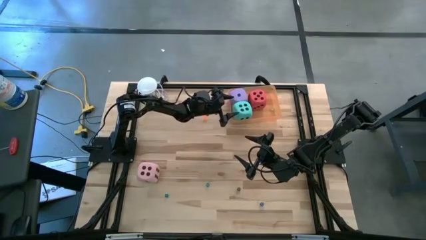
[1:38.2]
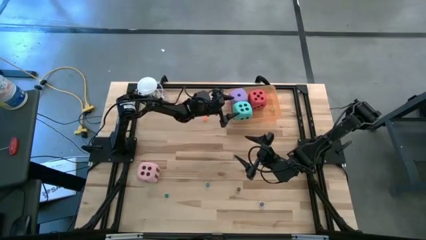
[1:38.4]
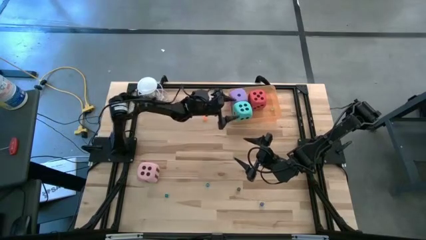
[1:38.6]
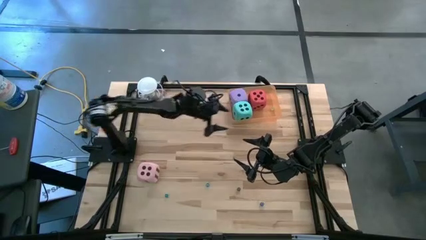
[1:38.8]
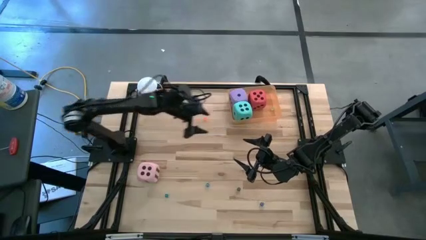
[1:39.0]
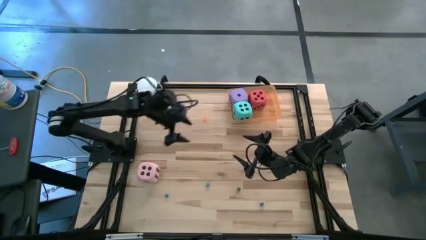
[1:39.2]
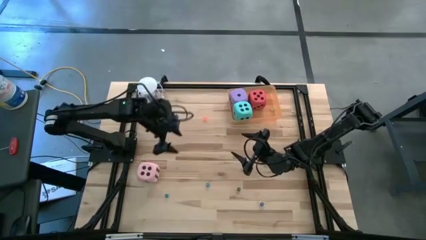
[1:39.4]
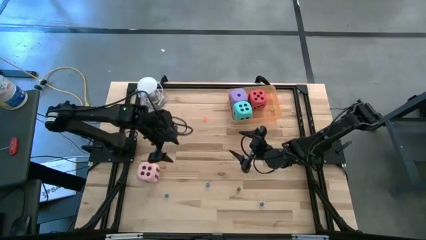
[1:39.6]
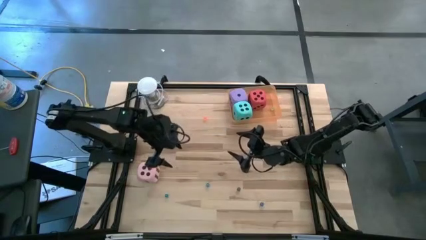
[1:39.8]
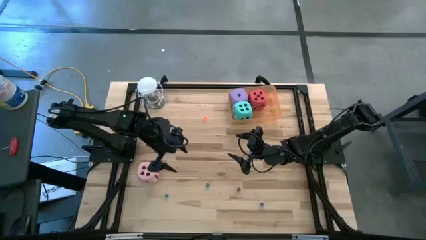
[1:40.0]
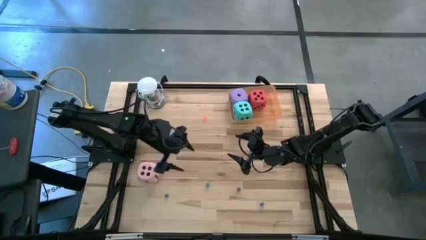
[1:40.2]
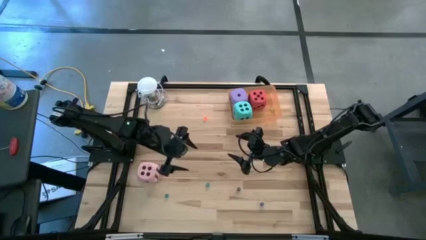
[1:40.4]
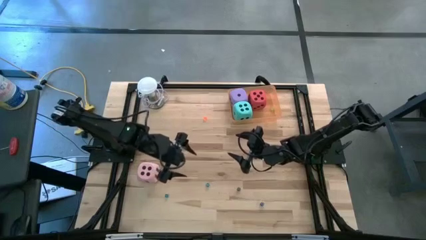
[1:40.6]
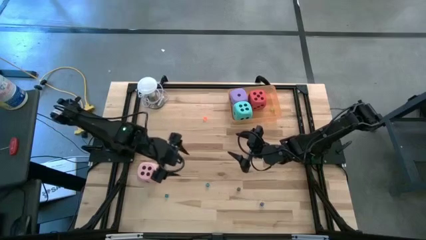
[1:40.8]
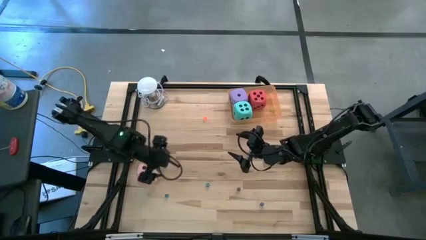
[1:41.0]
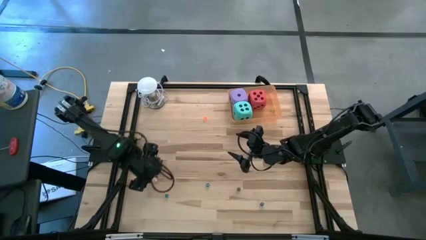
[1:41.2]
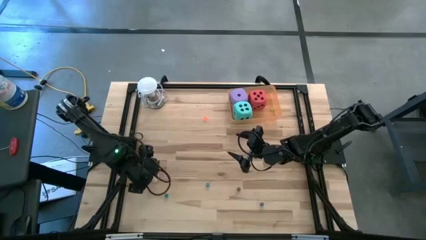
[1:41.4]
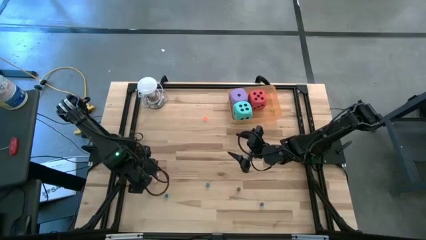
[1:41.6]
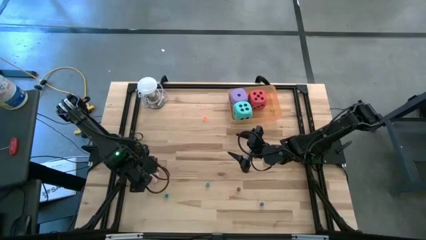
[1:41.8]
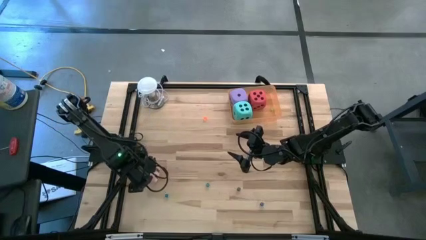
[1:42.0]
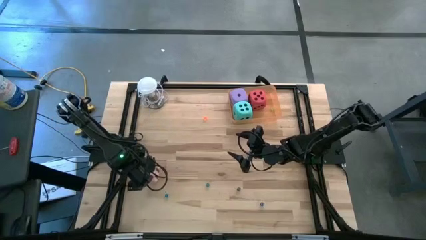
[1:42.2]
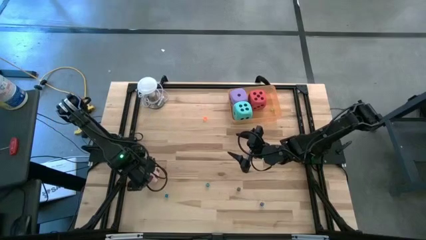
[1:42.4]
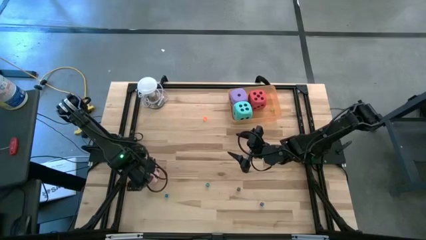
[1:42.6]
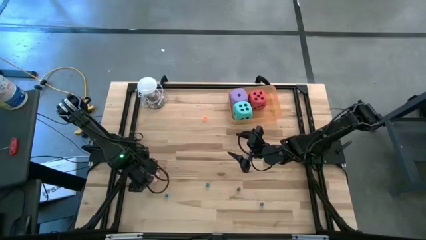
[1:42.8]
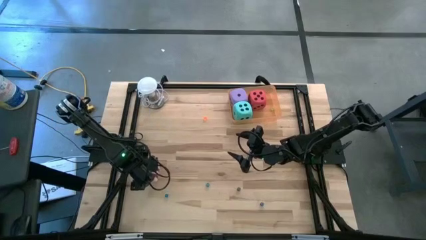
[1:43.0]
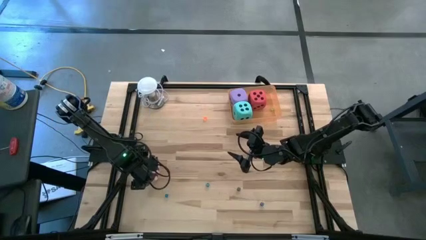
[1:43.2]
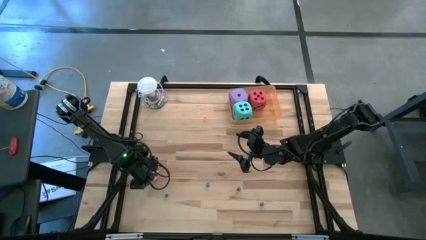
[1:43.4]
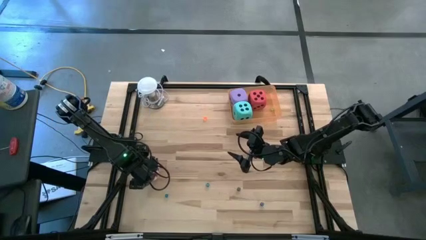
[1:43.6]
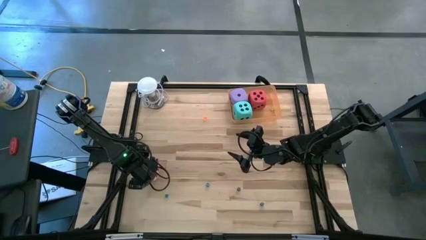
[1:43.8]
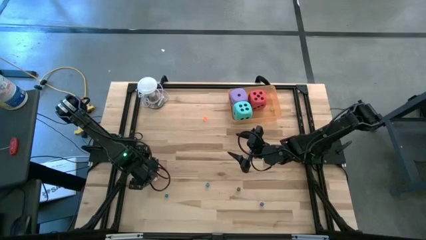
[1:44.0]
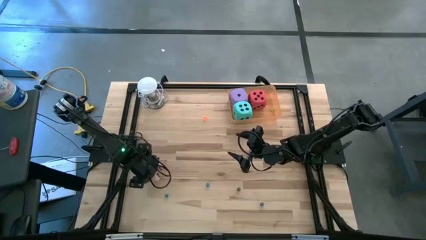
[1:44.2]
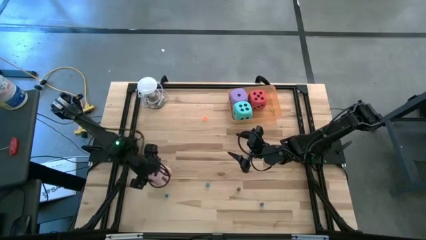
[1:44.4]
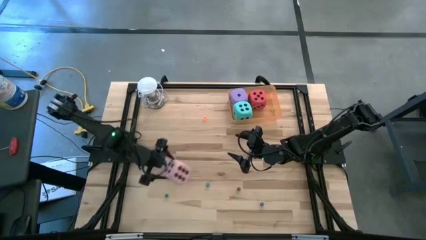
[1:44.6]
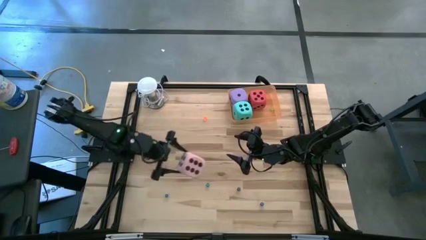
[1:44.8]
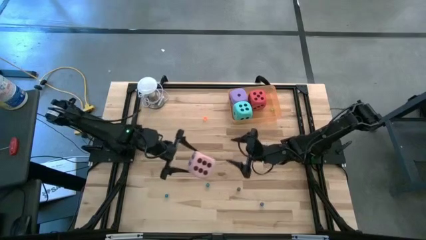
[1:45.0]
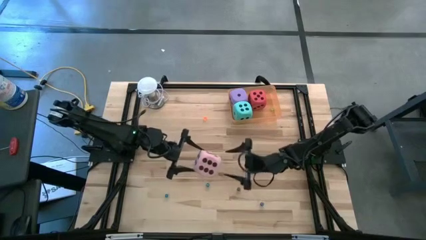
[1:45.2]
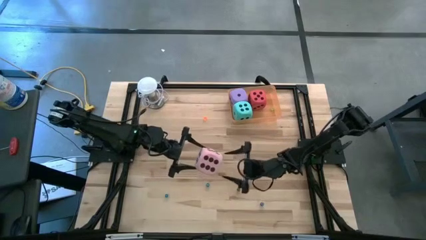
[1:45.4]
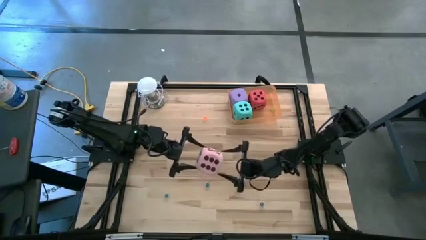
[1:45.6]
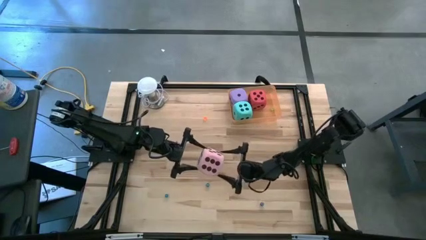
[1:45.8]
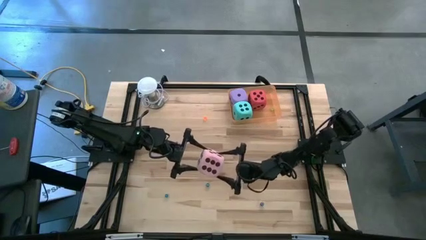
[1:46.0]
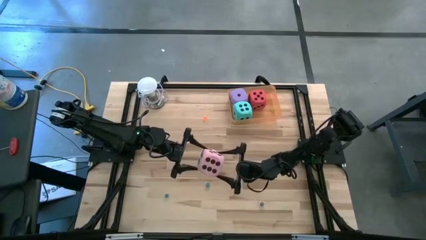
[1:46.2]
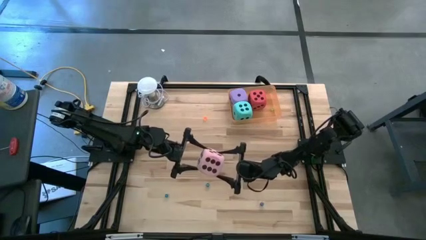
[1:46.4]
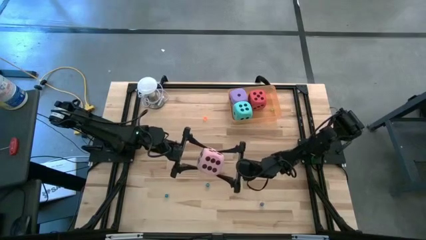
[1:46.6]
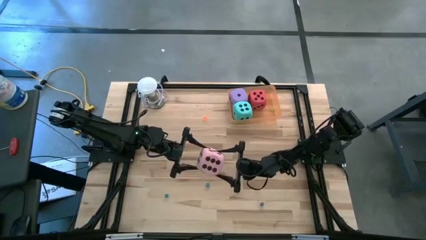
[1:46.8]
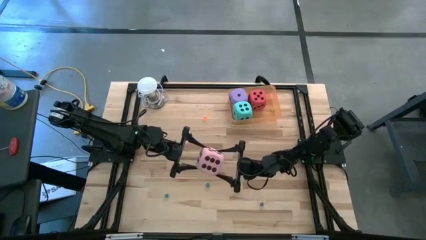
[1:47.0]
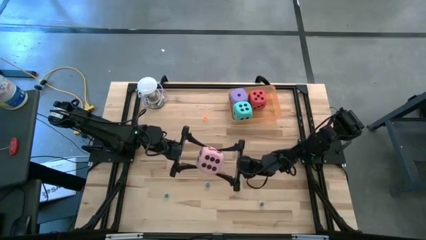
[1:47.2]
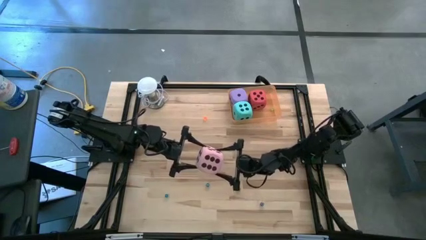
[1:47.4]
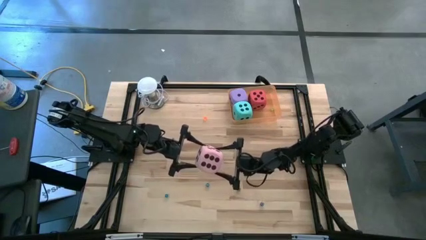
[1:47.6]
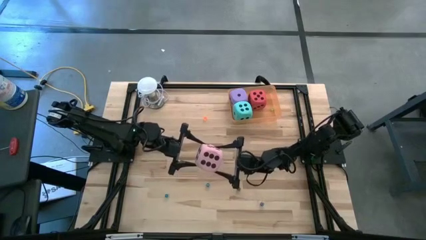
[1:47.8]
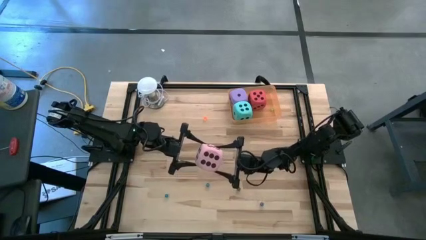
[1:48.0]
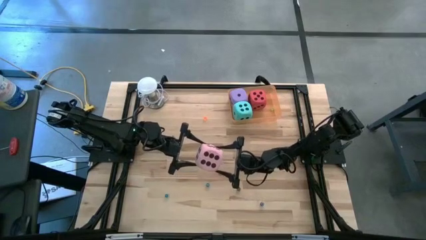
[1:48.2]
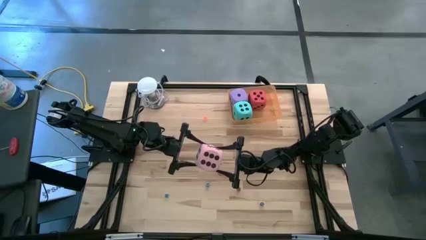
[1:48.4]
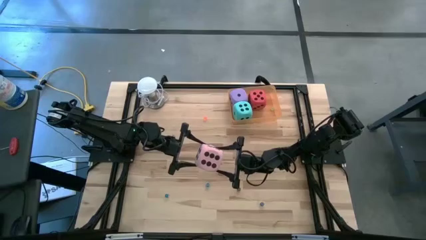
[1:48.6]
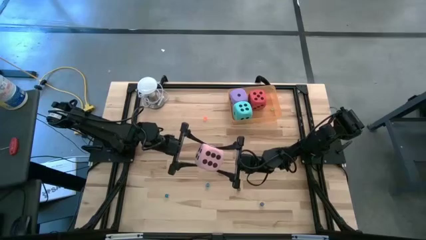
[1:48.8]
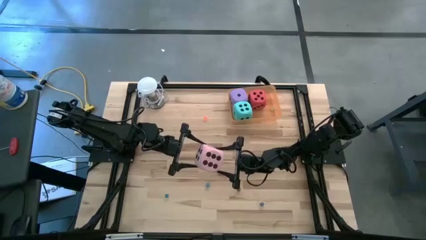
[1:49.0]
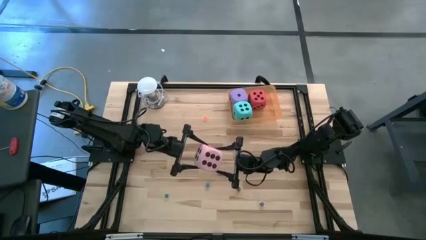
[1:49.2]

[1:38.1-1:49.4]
Task: Pick & Place Dice
Put the large pink die into the orange bin

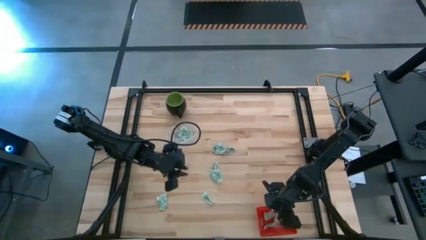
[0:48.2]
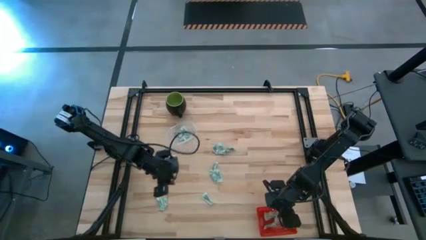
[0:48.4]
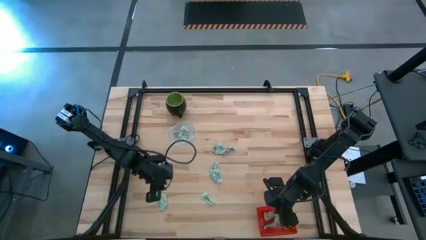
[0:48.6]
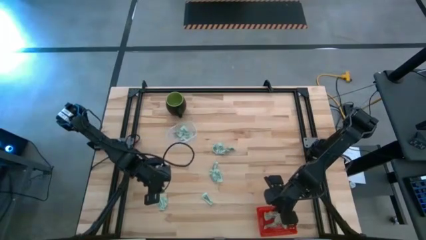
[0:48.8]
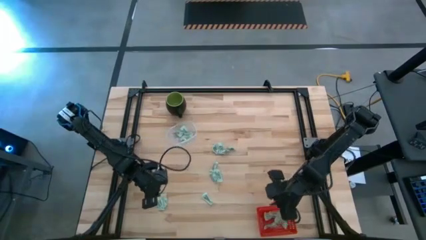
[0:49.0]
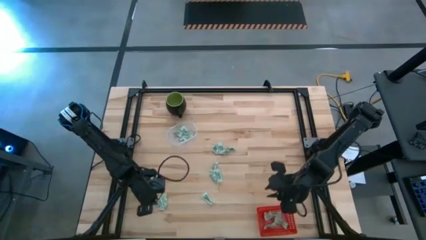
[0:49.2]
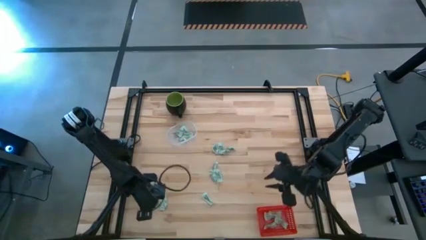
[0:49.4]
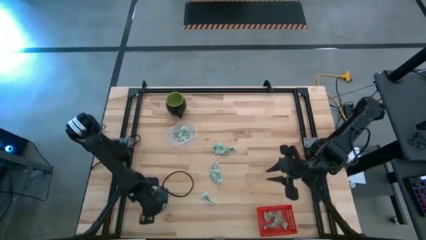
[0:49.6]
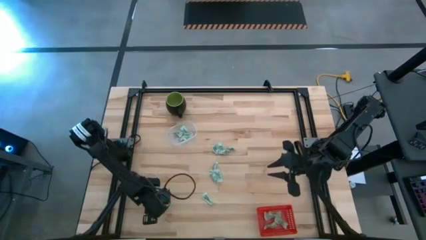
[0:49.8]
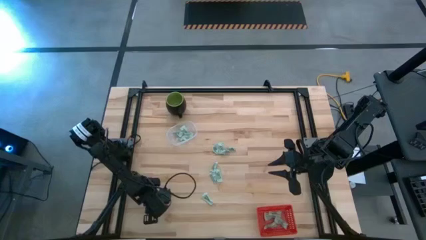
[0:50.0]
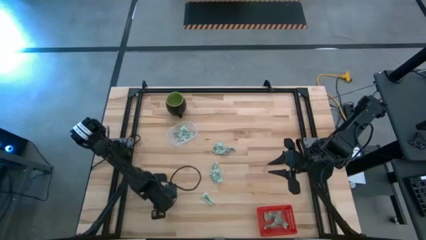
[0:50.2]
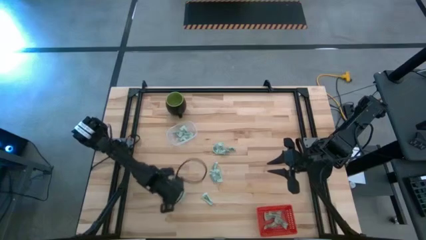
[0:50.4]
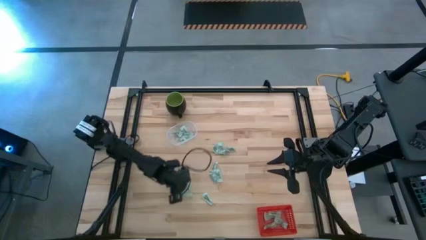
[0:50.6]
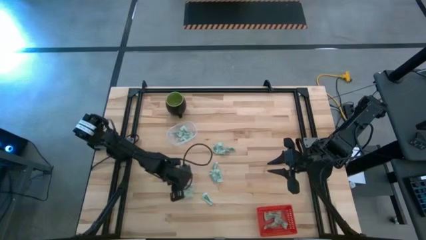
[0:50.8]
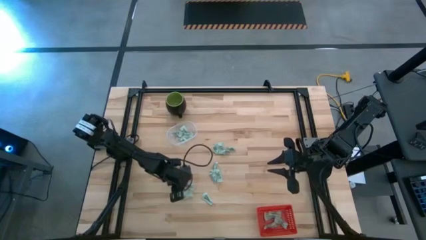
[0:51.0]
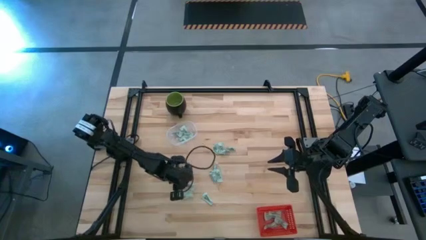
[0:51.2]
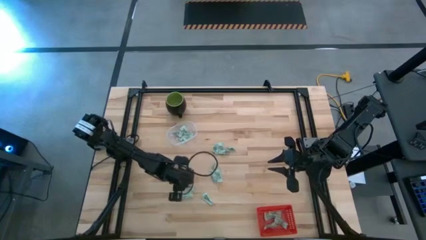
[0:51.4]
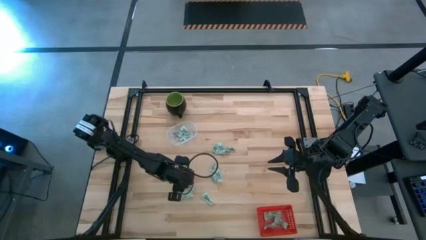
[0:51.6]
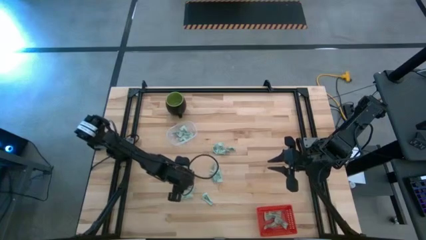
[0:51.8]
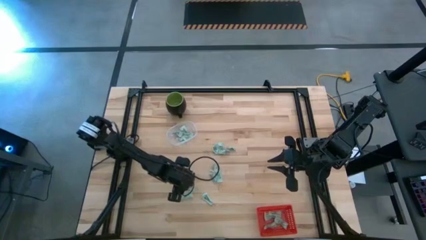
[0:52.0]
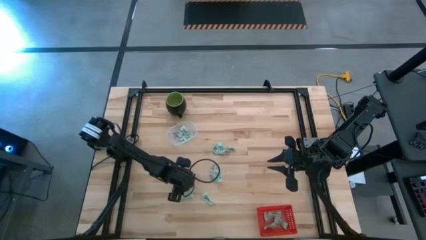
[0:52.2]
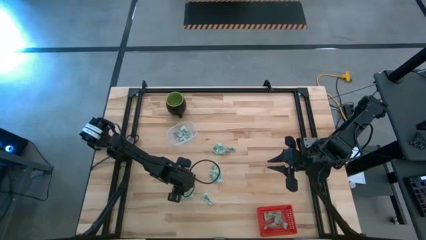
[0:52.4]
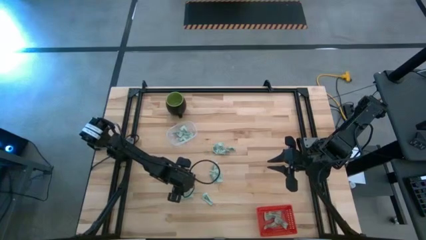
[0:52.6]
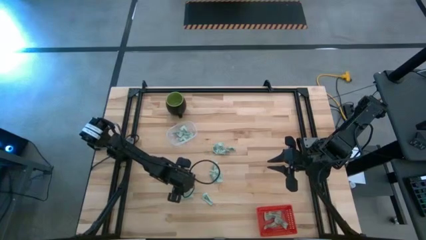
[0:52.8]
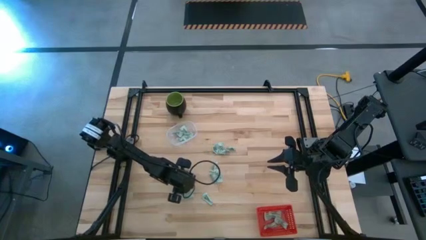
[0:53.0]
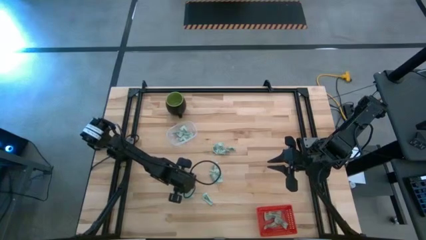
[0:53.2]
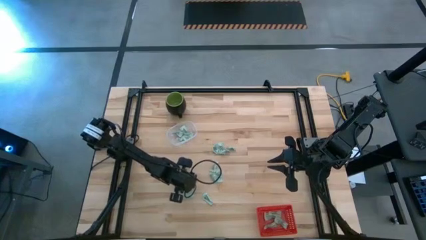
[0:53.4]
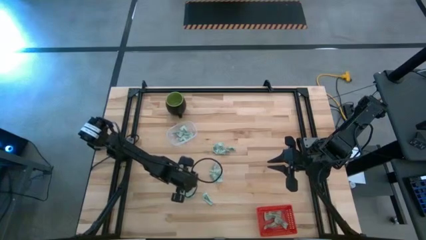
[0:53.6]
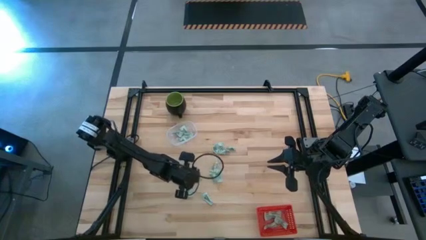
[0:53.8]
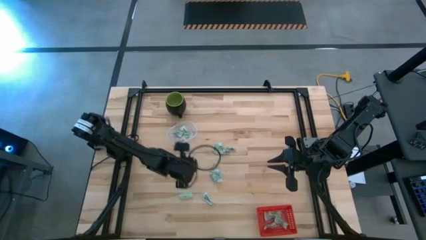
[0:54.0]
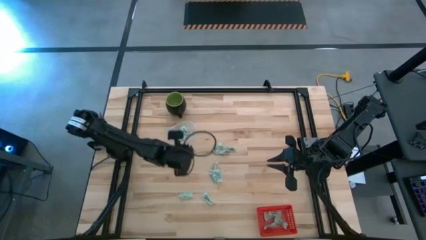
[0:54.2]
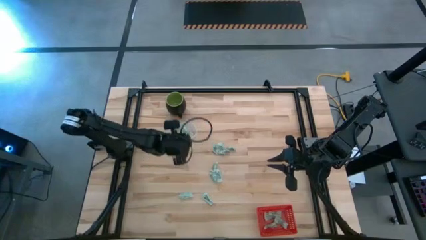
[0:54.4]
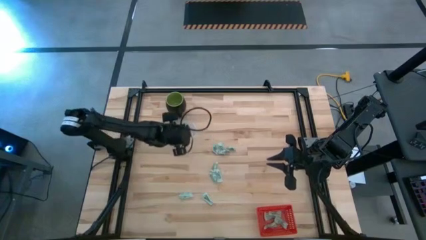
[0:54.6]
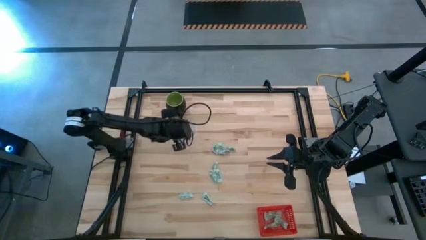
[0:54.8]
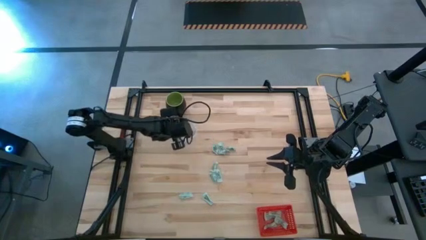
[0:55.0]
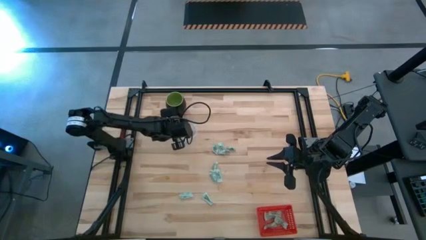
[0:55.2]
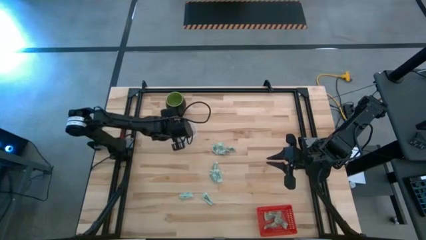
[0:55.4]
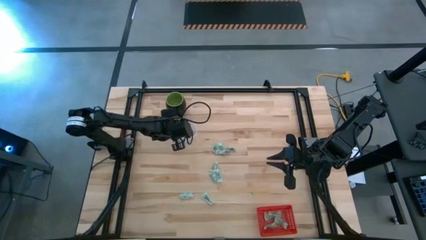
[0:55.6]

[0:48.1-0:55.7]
Task: Pick and place items into bin
Put the green stevia packet into the transparent bin
